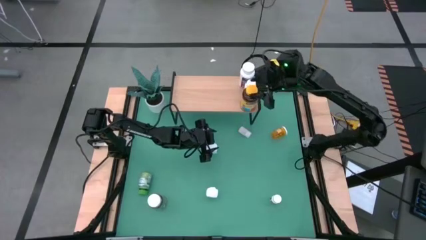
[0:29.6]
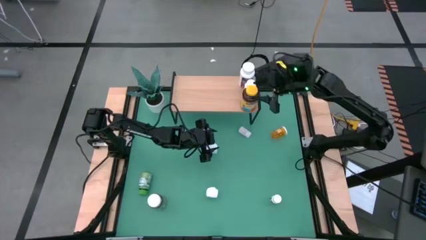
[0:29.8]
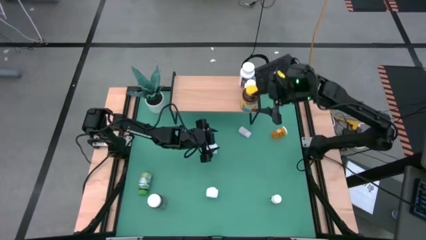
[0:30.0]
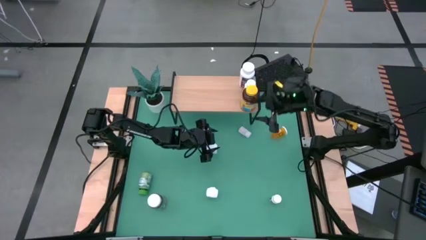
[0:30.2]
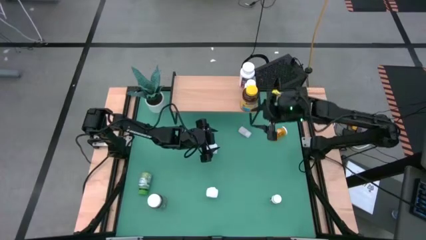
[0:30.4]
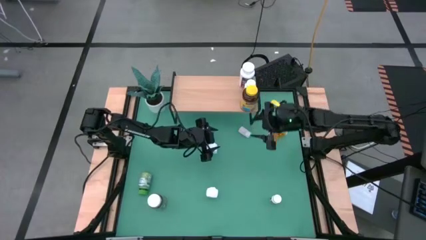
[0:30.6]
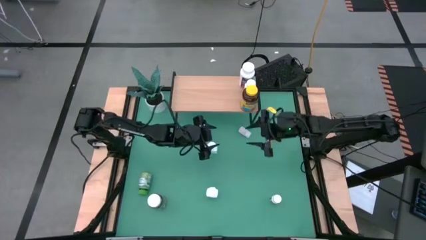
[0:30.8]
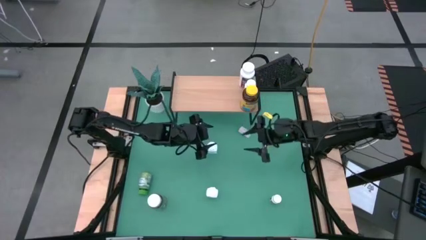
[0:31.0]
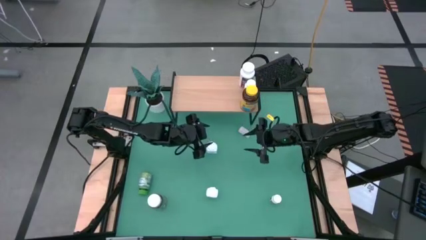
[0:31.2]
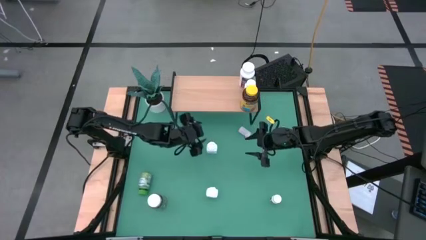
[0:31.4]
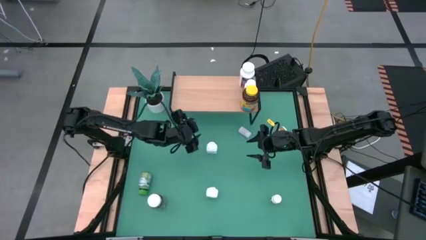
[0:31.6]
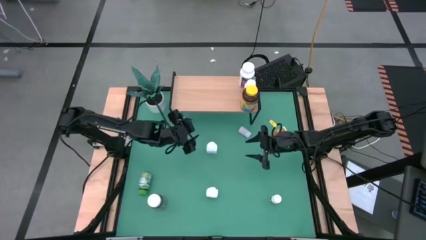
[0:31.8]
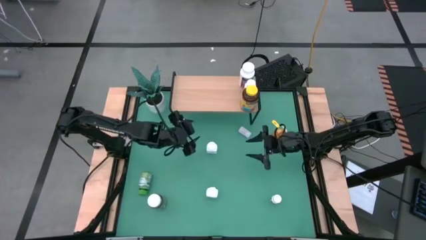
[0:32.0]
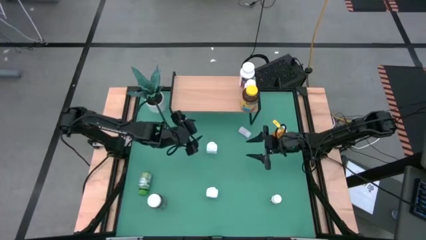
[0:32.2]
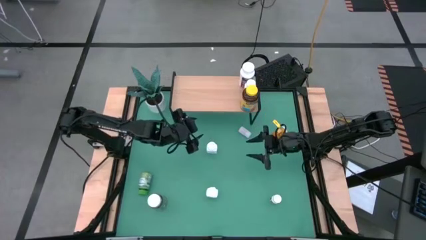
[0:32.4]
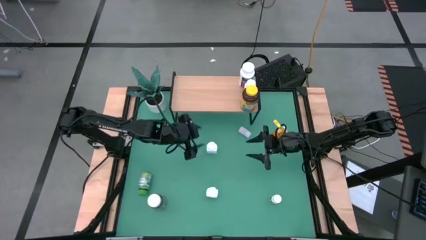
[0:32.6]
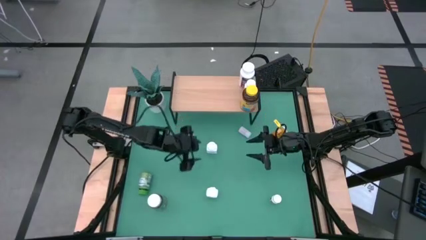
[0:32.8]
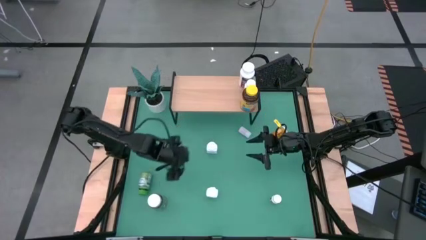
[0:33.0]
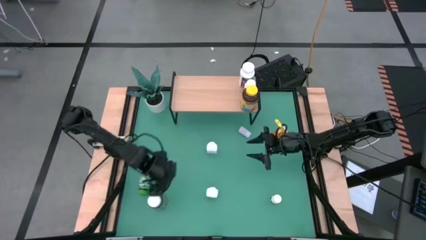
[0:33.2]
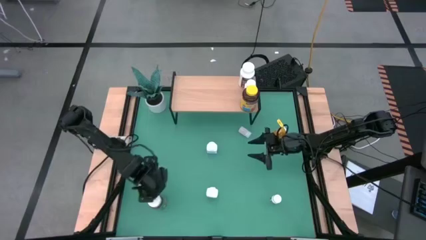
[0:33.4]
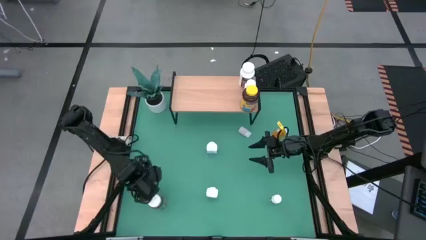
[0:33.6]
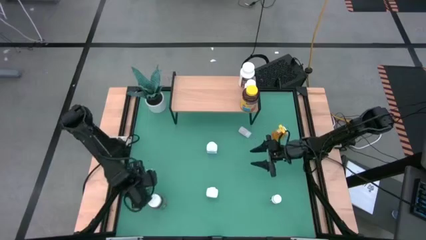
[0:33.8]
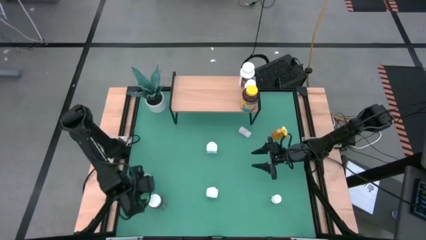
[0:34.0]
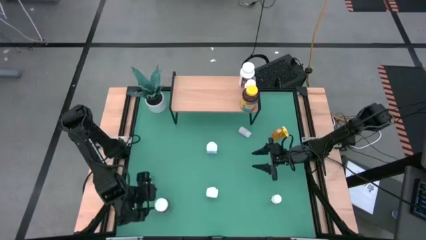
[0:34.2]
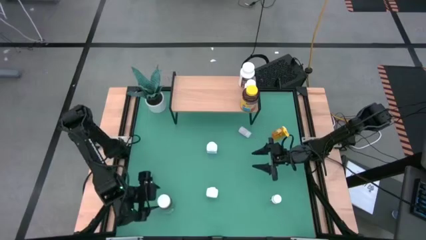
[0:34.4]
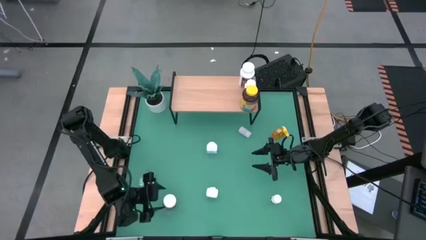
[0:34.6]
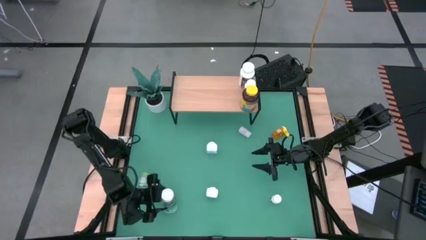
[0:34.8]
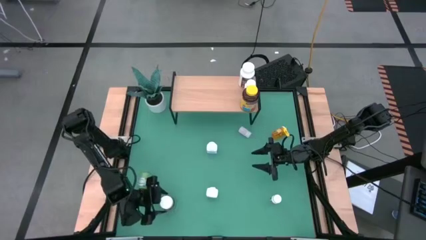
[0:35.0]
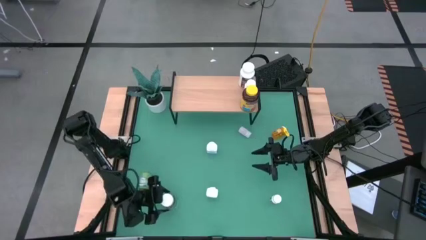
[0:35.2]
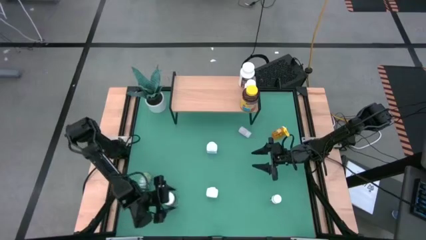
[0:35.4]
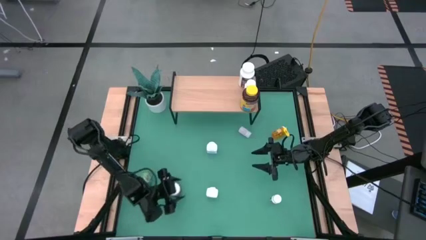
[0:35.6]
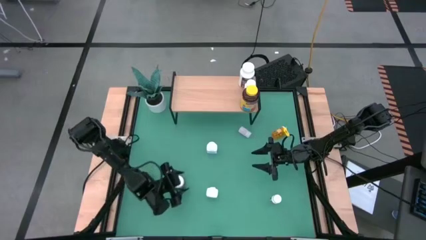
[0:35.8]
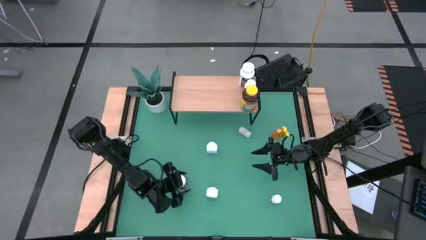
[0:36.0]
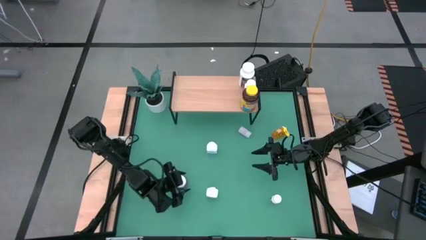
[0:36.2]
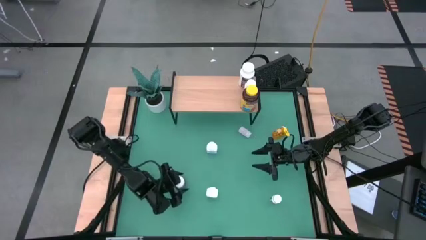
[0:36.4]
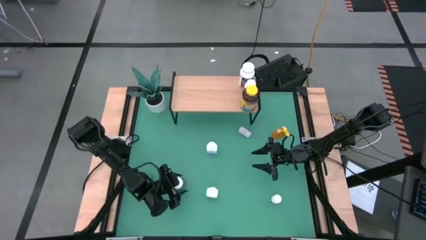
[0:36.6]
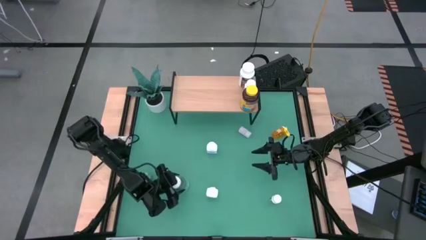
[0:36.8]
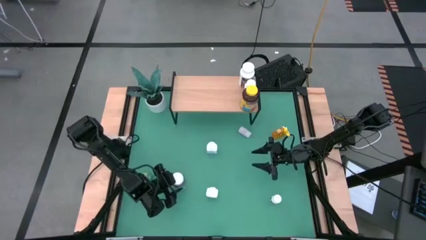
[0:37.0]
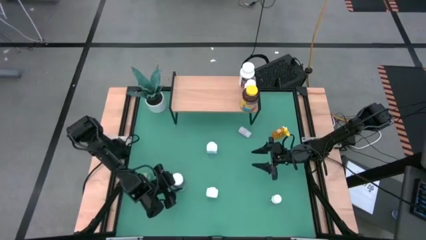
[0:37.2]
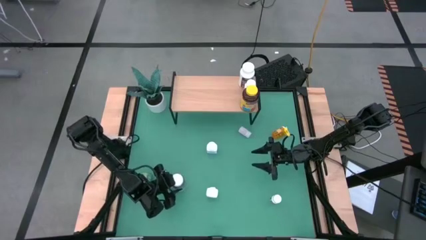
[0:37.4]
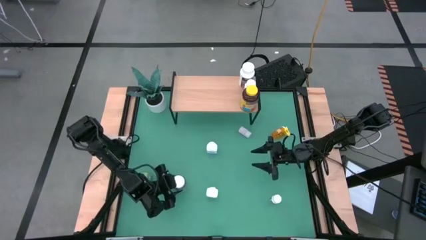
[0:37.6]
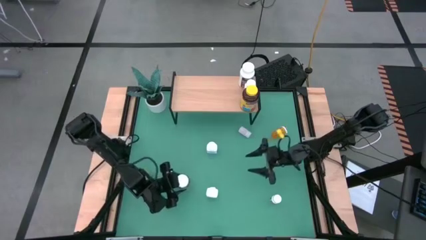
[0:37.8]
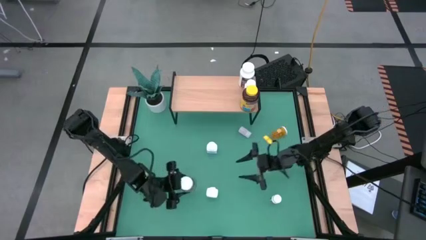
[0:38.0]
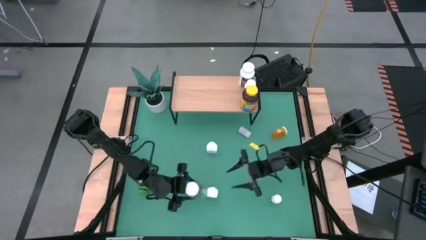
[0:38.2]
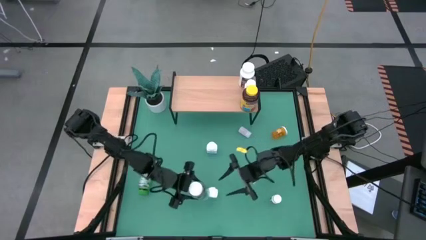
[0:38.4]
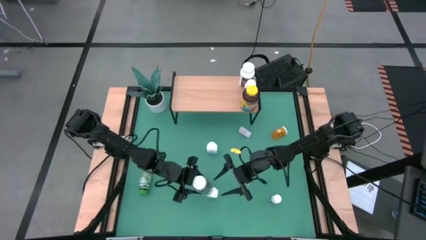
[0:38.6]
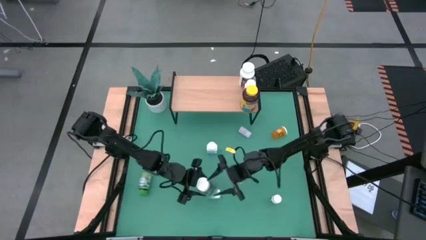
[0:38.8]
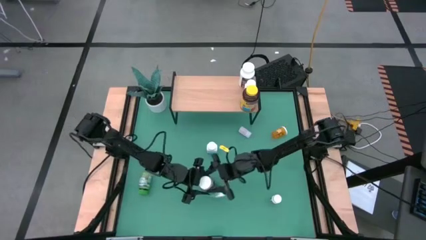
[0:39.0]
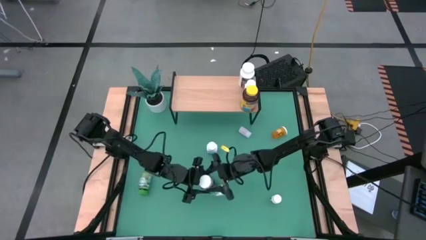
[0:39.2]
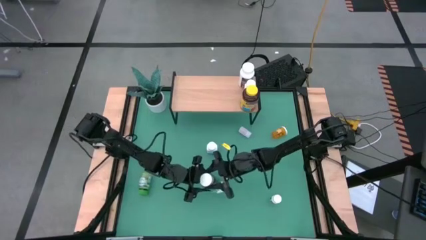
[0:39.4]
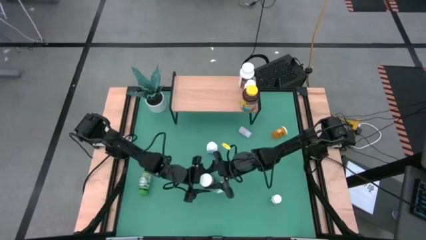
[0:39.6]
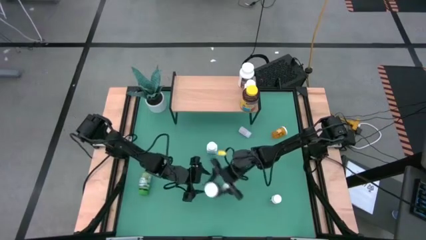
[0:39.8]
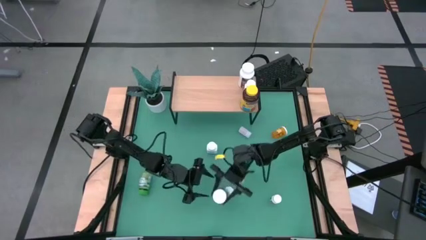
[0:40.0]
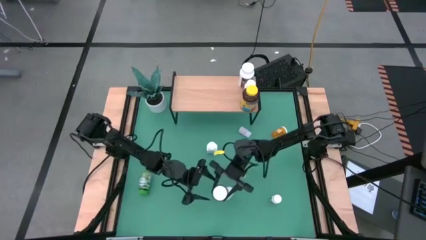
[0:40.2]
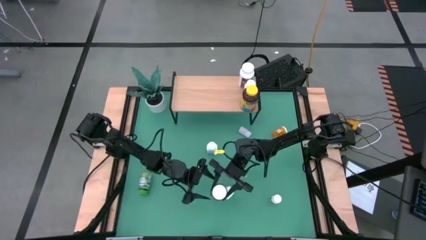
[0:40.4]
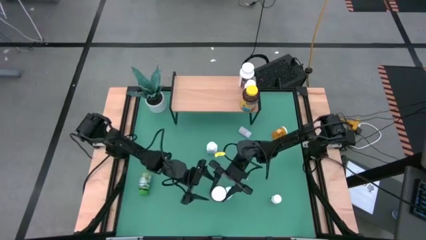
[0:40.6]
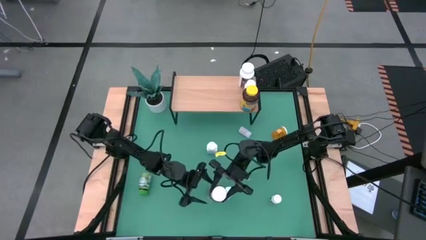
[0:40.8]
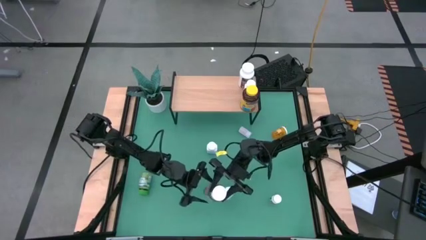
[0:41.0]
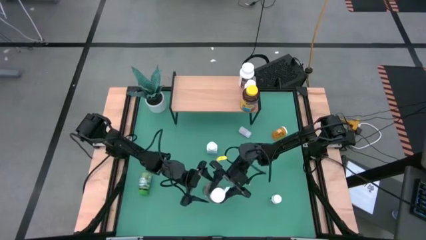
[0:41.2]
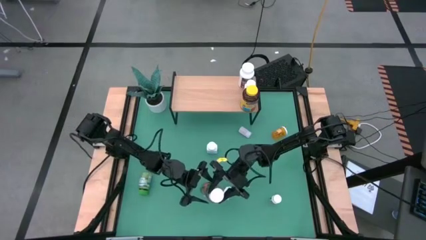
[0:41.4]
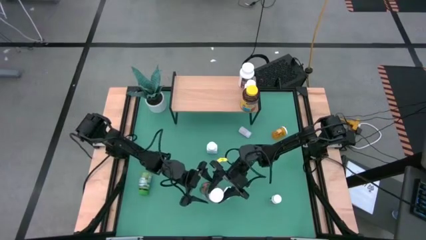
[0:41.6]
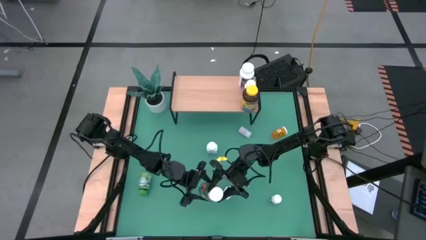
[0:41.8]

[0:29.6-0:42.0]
Task: Pick and place medicine bottles onto shelf by color
Put the green white medicine bottle on the shelf

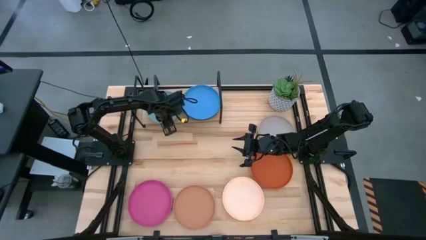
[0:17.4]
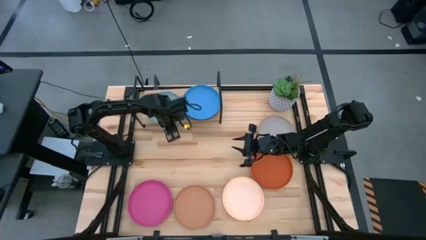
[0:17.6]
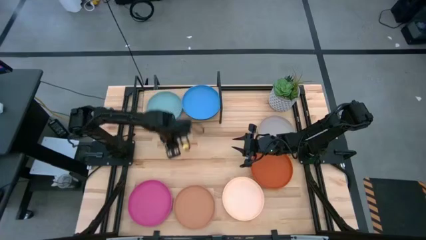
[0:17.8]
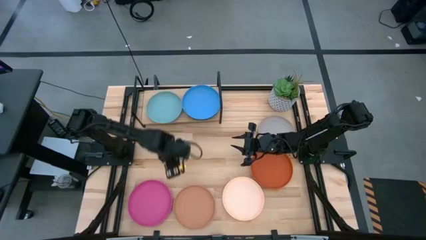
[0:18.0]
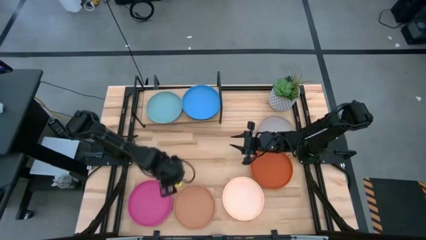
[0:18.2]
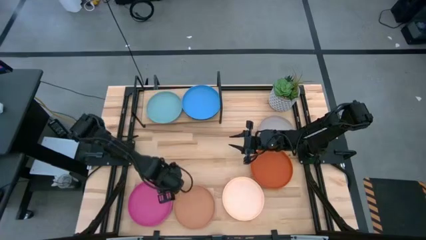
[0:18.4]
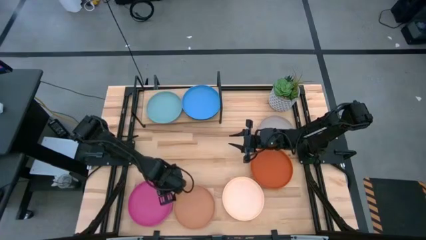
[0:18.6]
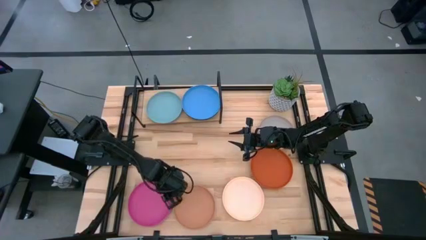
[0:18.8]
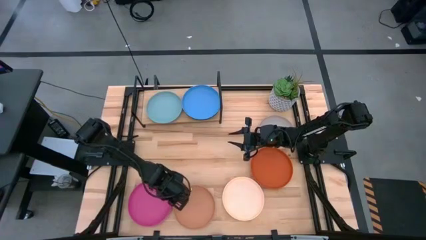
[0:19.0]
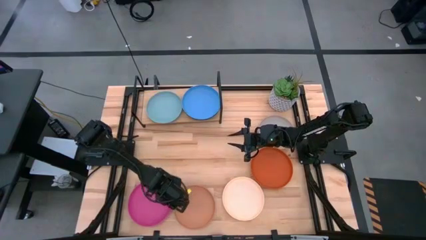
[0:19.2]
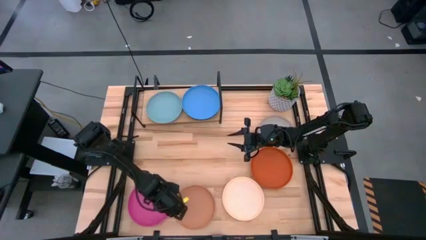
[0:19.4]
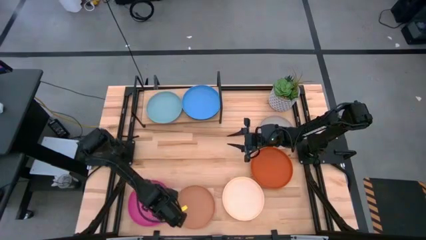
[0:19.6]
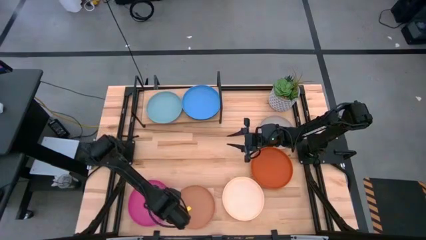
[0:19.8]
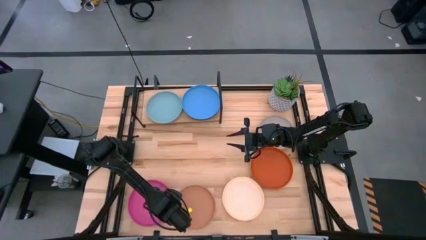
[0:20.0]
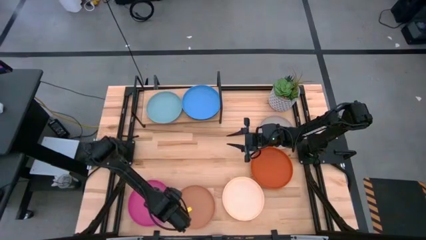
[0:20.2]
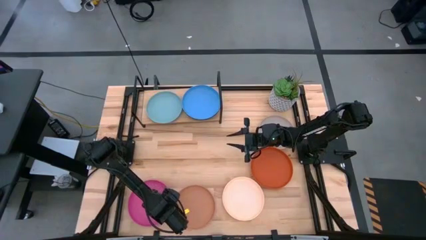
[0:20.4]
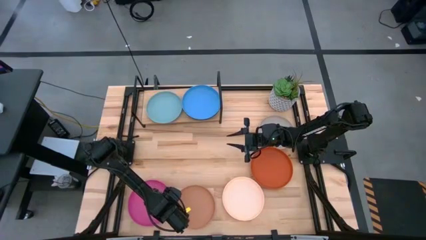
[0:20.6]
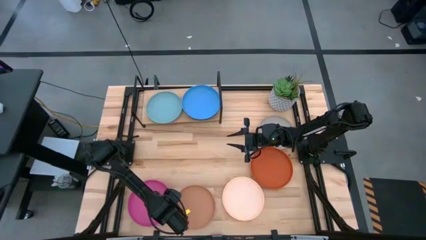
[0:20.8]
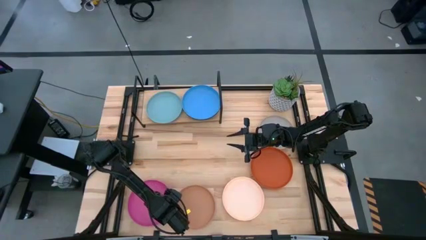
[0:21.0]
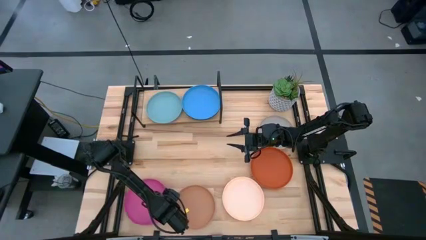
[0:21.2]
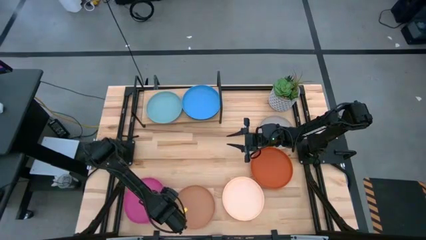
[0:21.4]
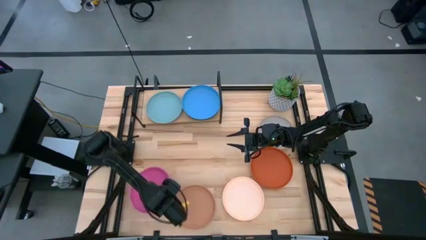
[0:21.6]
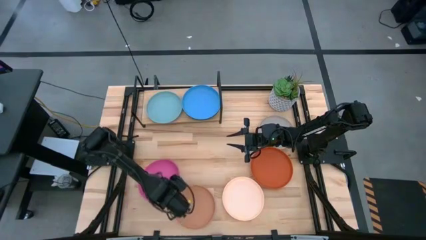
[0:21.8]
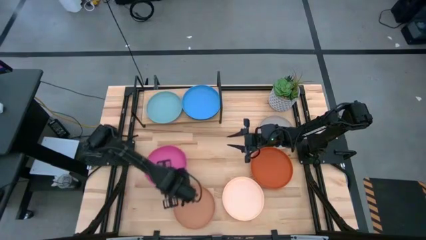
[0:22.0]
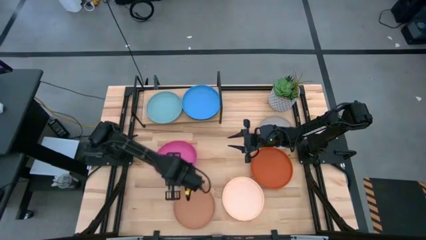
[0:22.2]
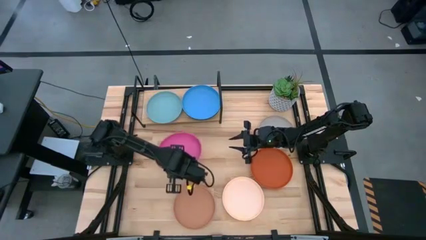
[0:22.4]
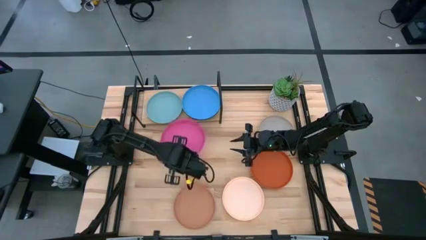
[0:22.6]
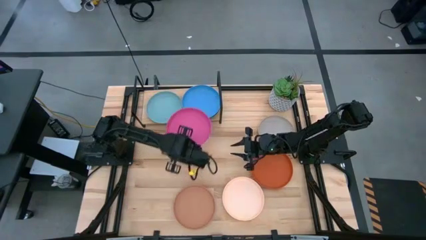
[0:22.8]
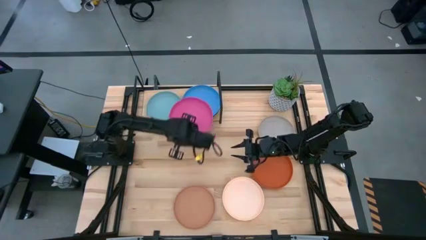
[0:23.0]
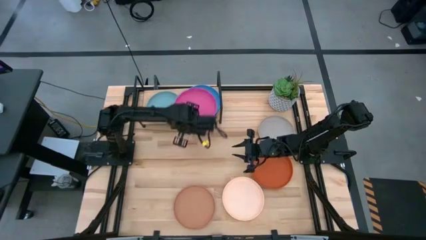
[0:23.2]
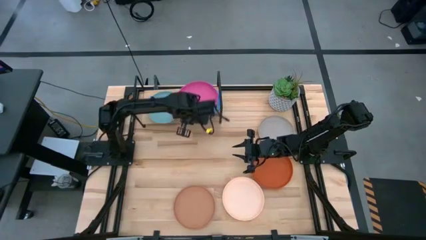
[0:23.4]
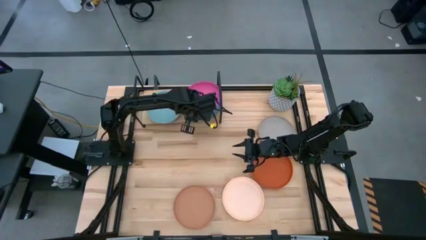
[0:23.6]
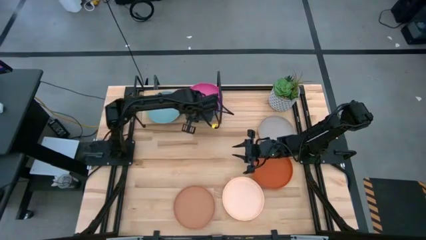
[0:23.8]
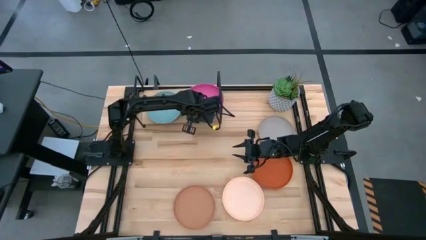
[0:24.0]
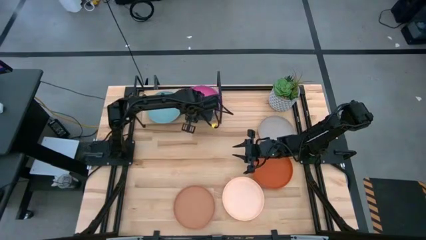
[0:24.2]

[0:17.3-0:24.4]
Task: Place and stack plates onto a shelf
Stack the pink plate on top of the blue plate on the shelf
